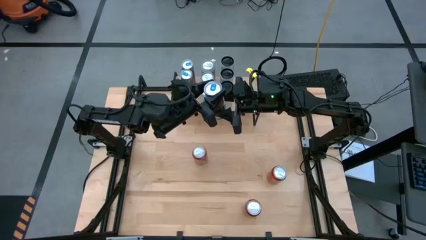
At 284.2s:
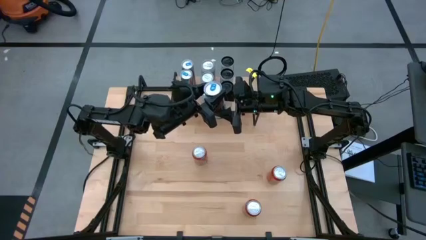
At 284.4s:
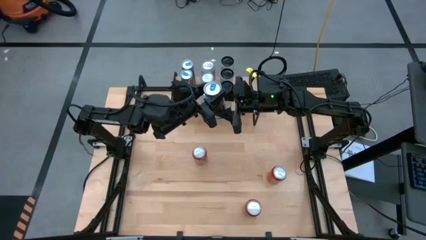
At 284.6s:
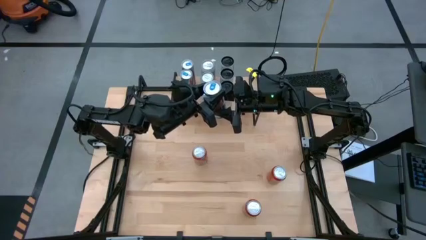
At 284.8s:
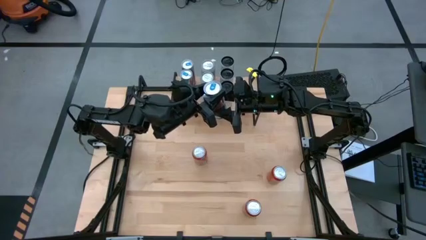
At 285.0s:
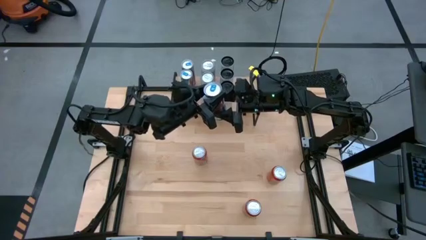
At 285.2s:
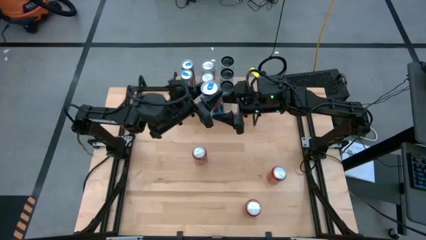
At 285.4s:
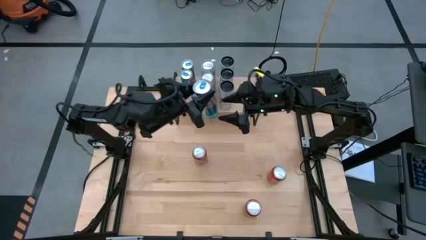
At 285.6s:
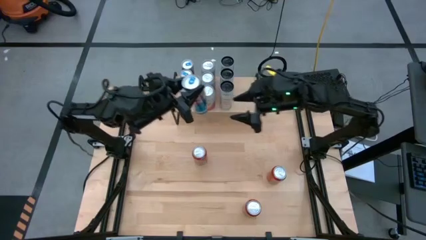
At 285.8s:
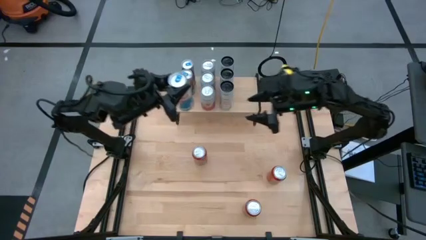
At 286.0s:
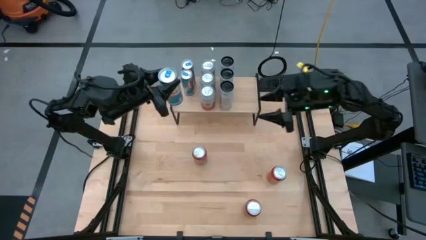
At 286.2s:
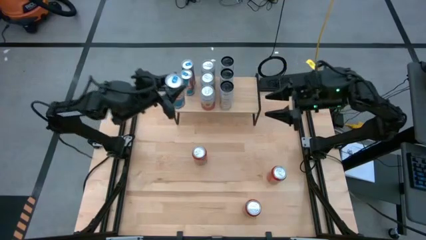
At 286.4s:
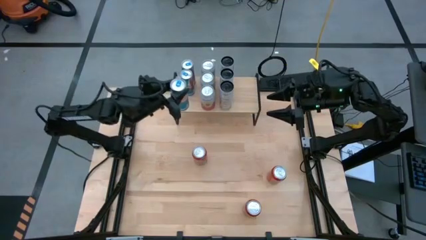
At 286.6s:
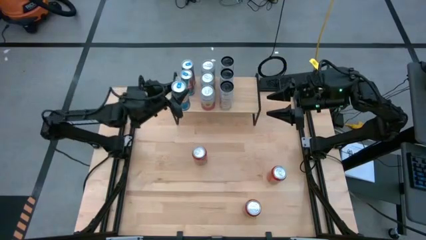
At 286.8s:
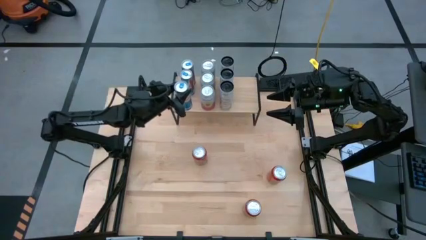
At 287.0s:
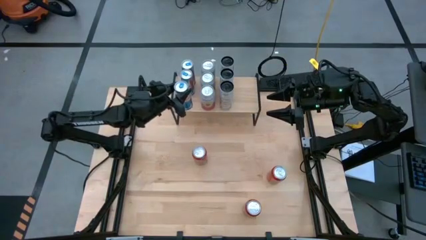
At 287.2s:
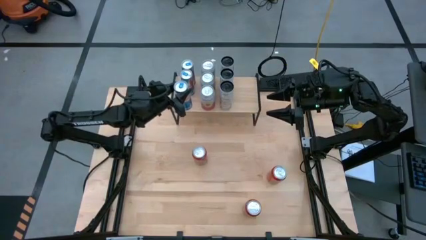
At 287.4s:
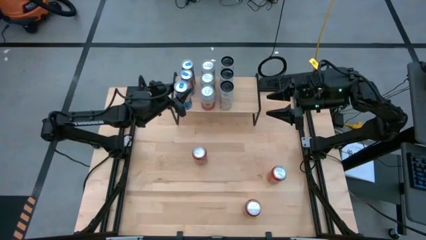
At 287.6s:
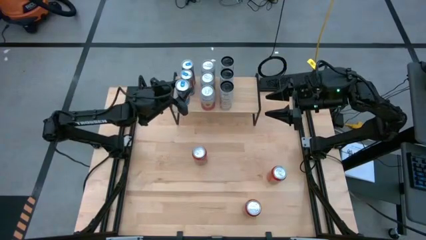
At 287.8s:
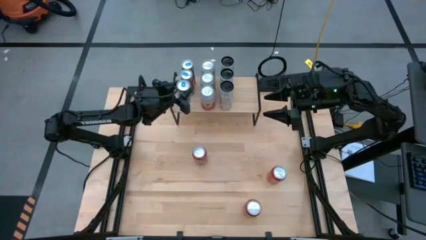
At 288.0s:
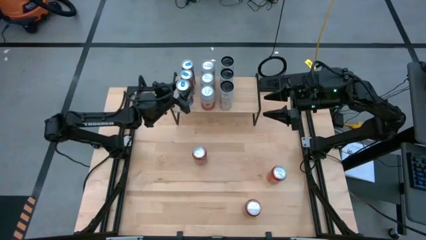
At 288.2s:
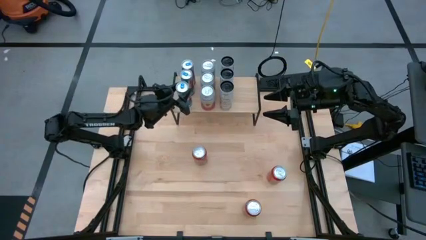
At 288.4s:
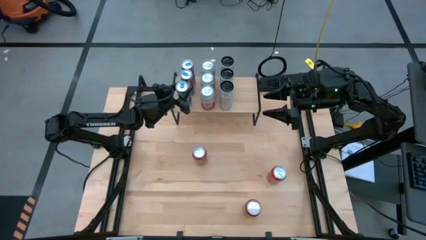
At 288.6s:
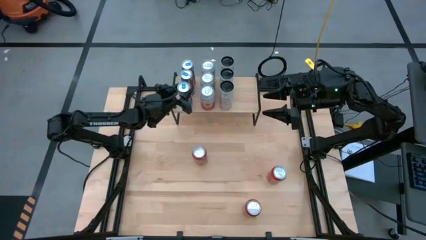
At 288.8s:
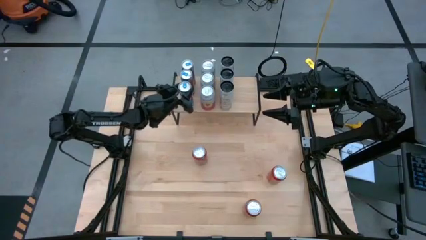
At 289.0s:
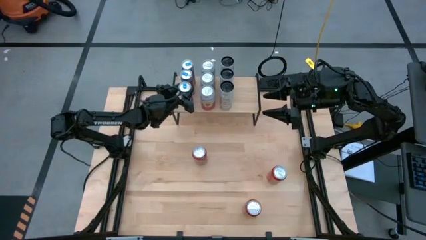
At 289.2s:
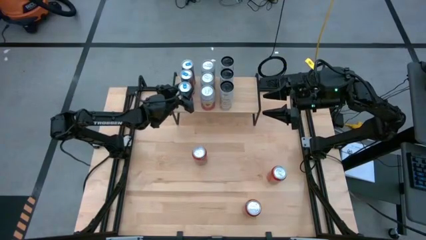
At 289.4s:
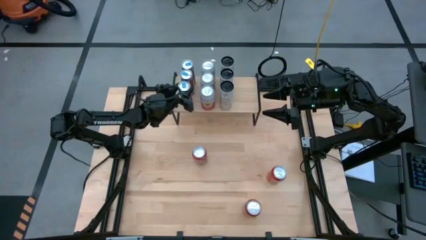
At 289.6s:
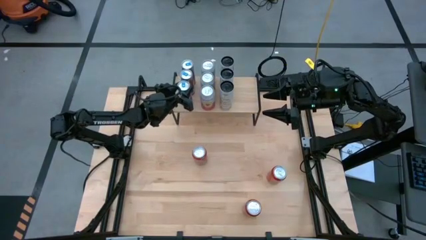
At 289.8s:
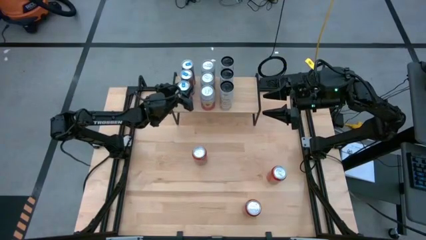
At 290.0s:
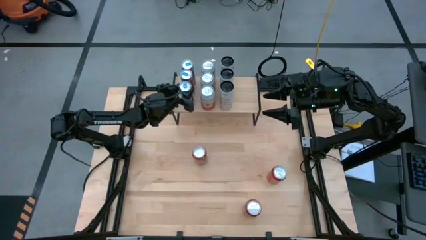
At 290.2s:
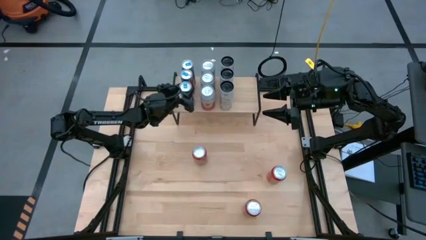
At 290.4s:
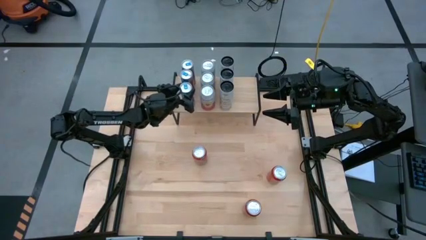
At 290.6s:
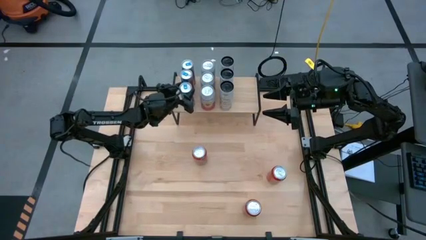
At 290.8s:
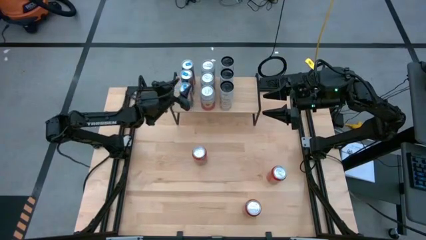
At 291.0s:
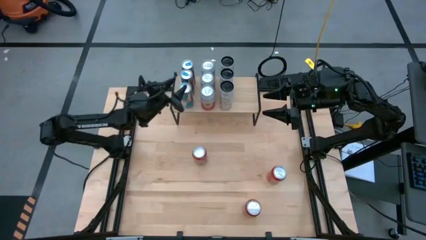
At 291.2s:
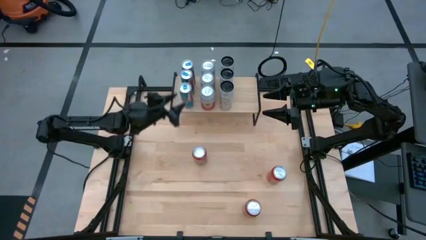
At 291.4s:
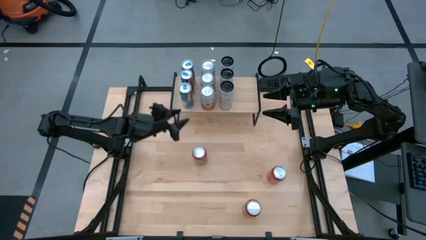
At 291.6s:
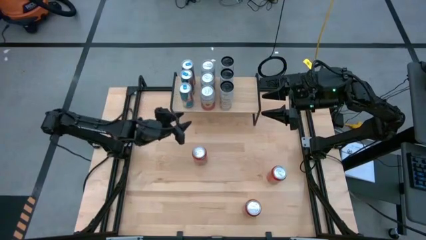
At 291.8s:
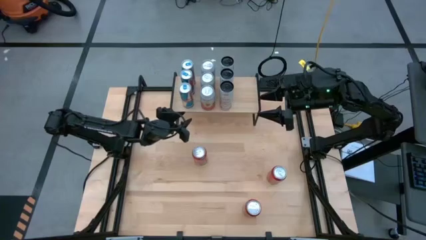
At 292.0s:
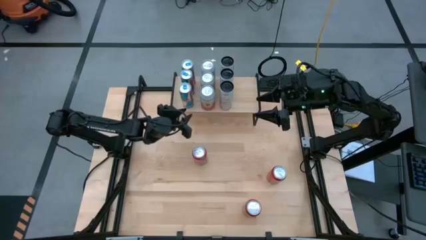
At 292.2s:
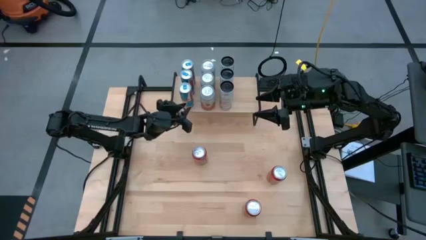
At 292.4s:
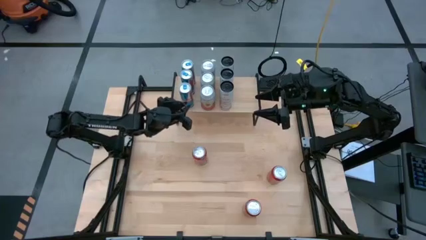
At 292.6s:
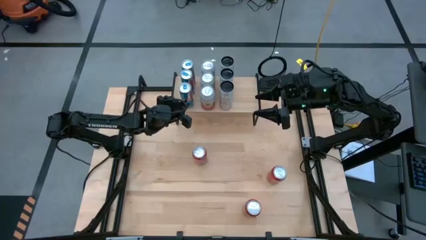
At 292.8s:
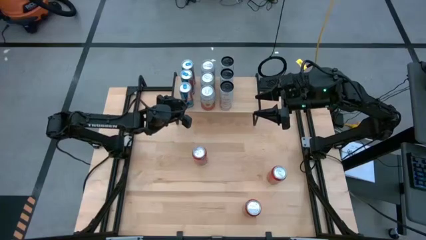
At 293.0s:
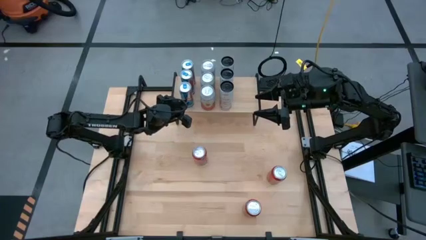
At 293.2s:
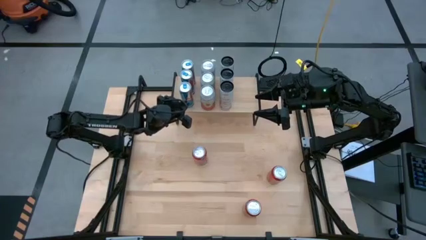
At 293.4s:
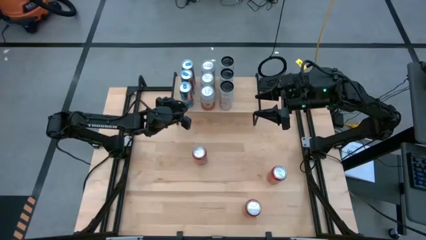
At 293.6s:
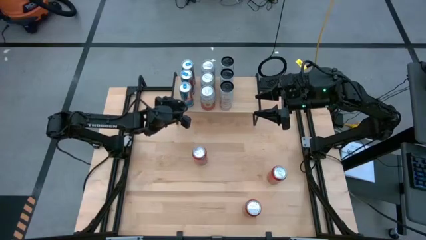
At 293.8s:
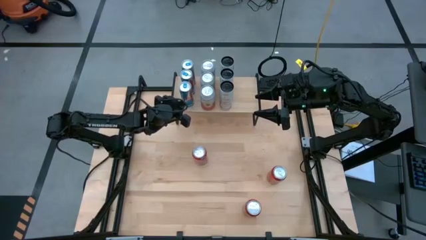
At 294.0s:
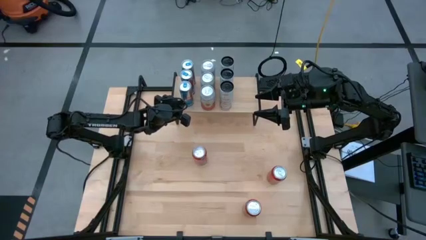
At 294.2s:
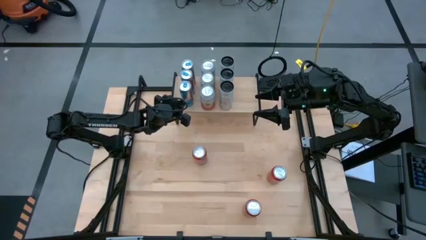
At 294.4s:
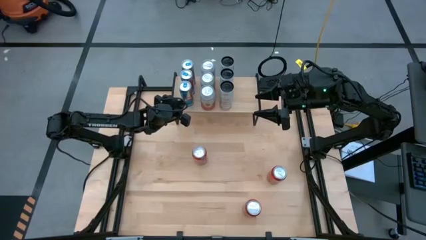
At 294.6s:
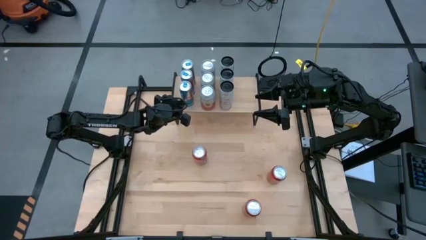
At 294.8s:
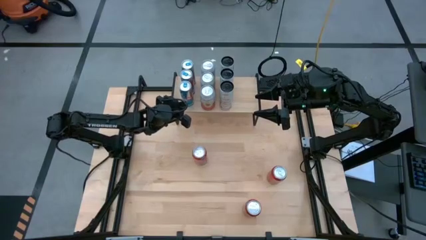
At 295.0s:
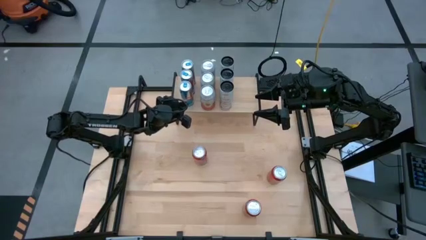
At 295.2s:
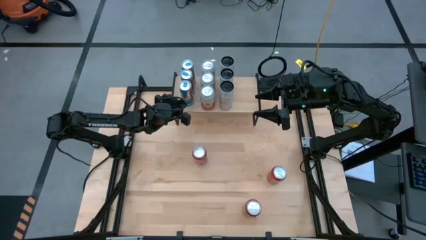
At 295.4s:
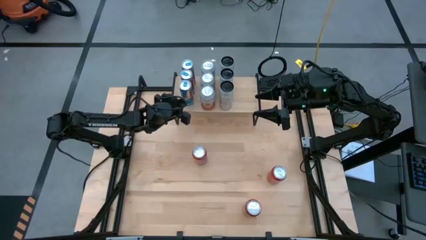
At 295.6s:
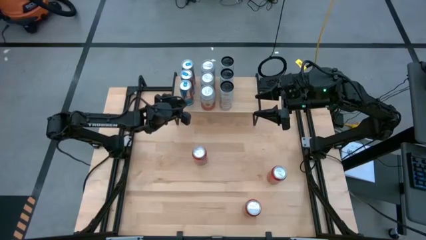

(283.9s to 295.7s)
Task: Place canned beverage on shelf
Put the blue soda can aligned with the other blue soda can on the shelf
